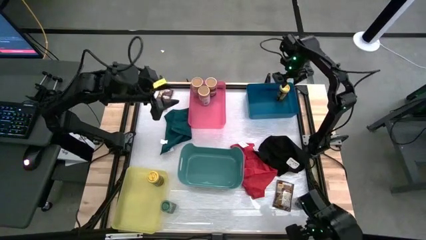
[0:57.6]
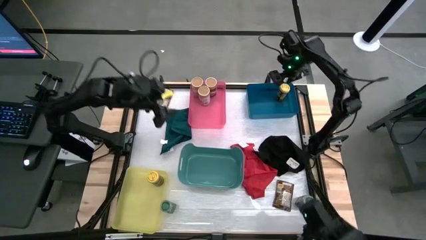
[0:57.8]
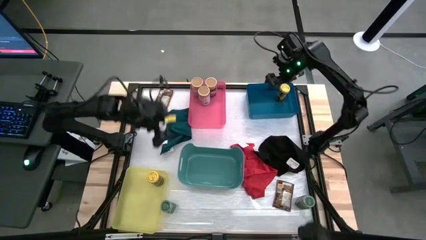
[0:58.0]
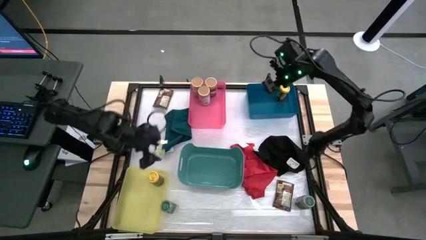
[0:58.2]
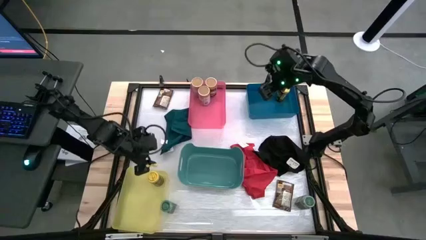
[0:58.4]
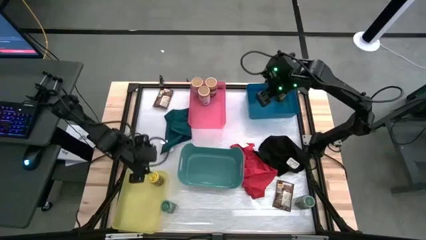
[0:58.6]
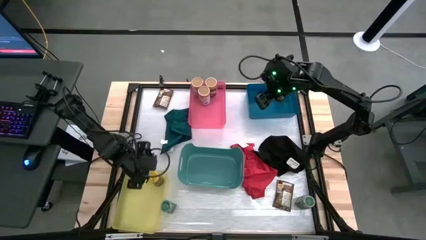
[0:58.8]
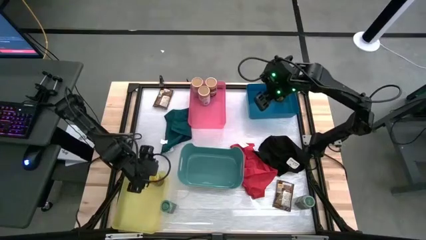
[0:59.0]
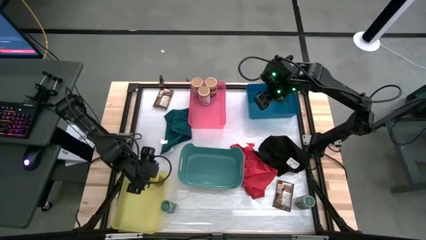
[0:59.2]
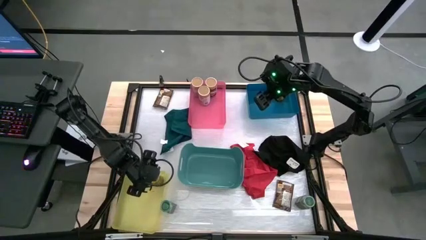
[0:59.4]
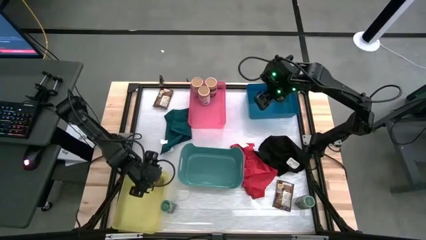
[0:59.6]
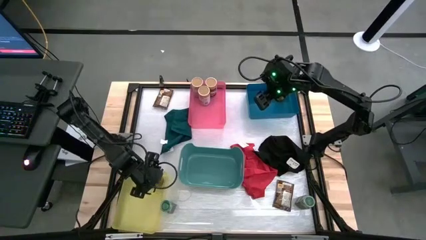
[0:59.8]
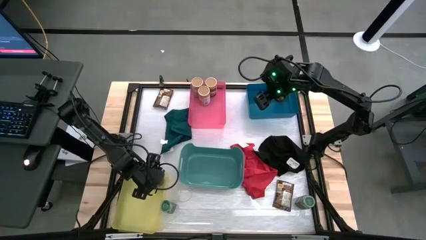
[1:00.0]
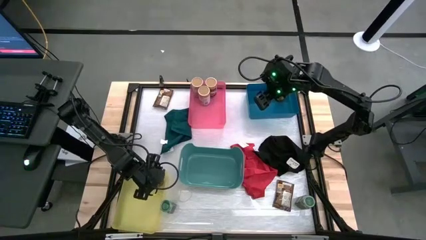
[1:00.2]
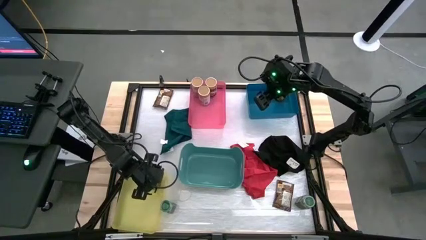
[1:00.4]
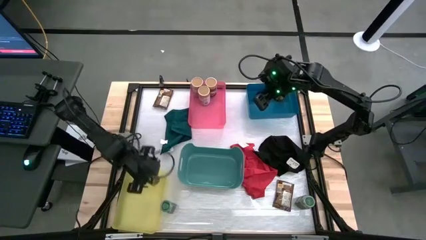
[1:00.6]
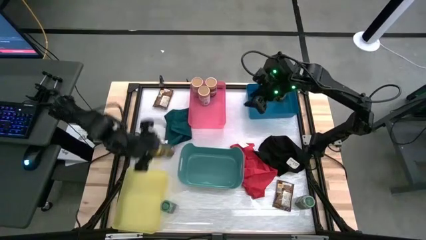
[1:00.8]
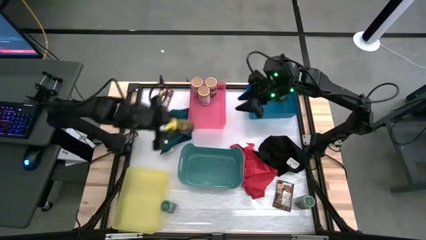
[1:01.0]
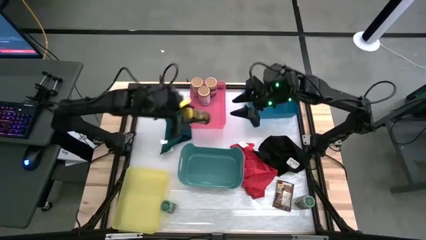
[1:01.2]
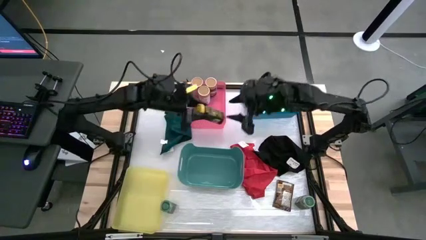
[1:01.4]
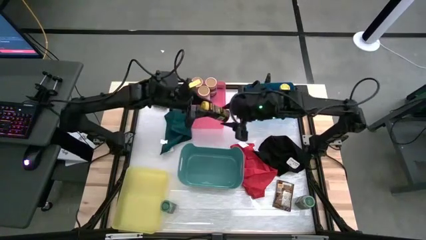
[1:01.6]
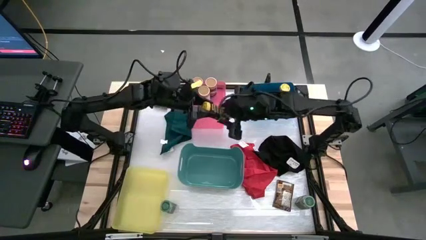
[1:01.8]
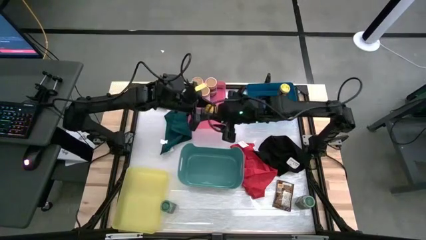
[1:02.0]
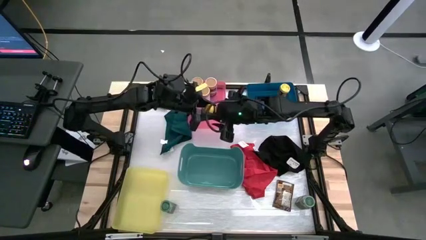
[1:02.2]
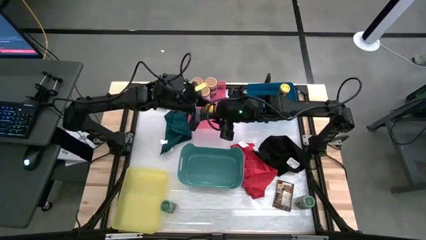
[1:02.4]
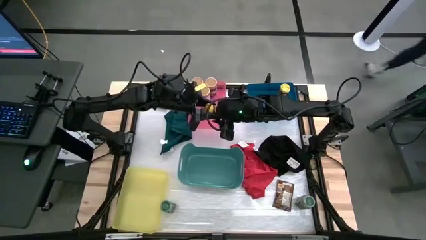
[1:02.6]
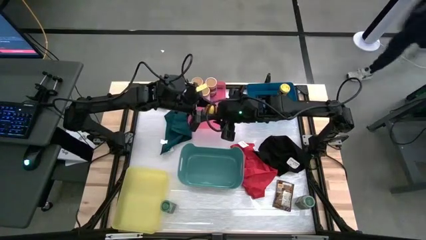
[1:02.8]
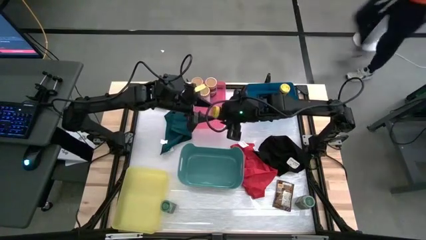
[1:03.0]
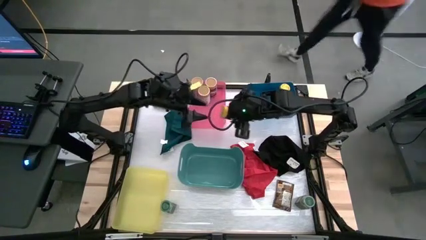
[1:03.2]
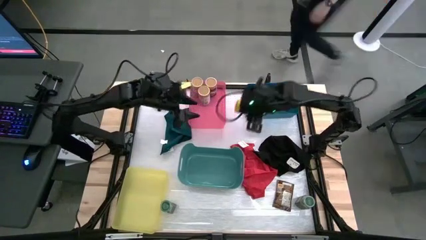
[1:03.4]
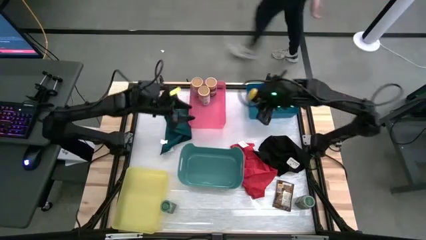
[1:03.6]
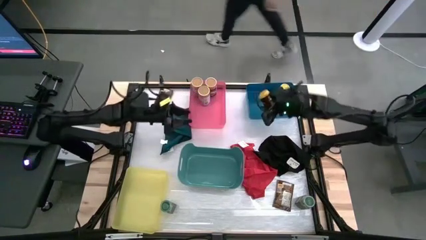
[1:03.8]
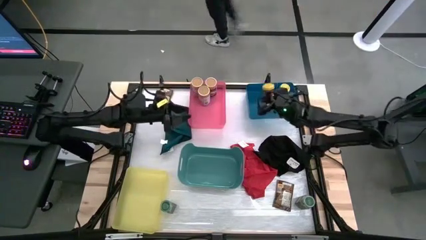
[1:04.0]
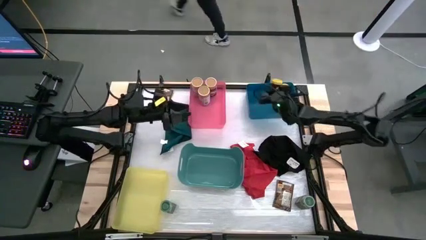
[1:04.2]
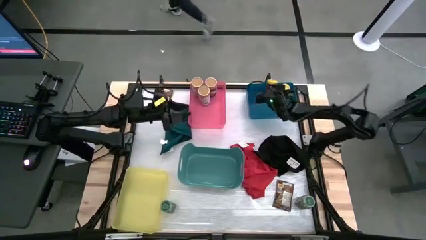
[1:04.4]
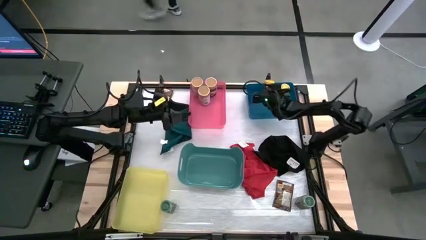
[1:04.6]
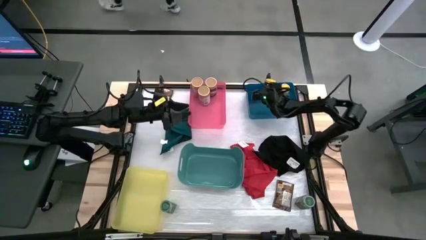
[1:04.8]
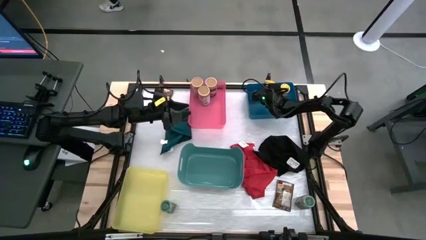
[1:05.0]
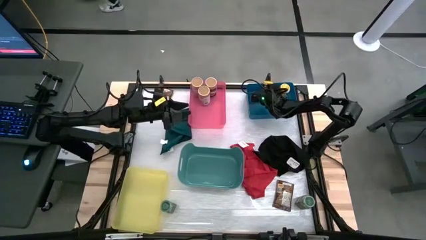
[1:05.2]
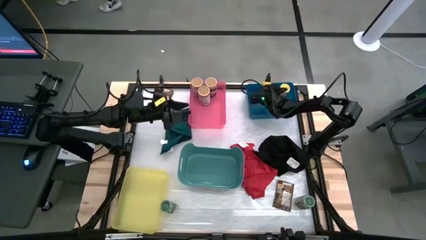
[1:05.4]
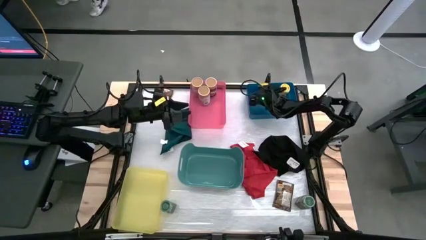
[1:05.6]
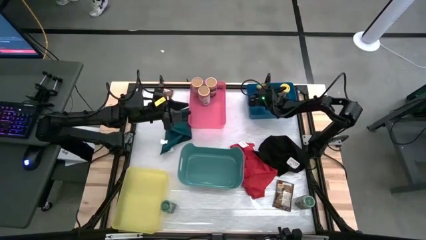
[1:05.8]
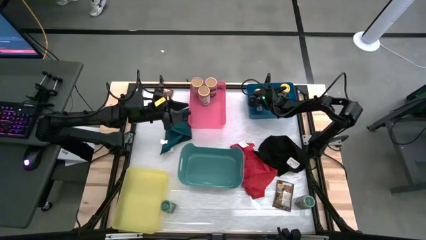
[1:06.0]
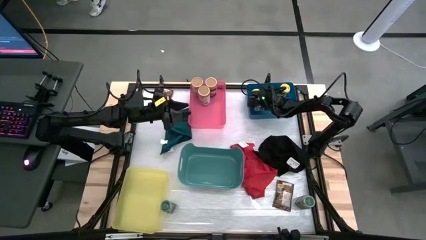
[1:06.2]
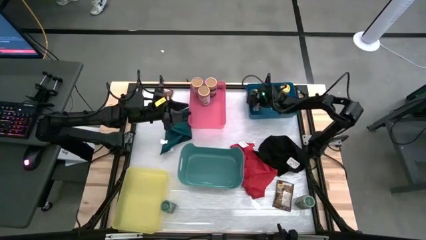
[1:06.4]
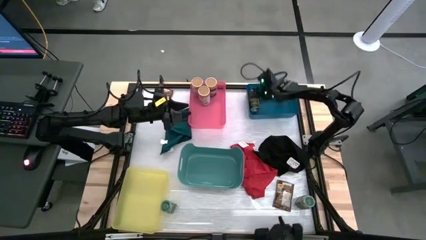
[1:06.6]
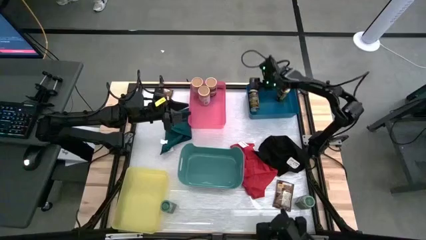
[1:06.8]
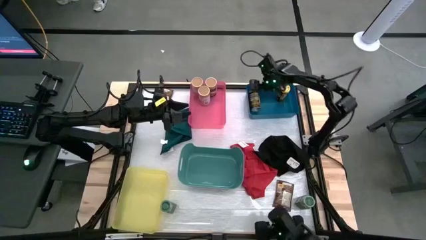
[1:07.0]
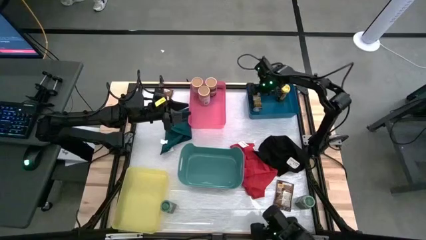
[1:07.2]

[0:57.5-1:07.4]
Task: Sort spices by type
Put the yellow seasoning bottle into the blue bin

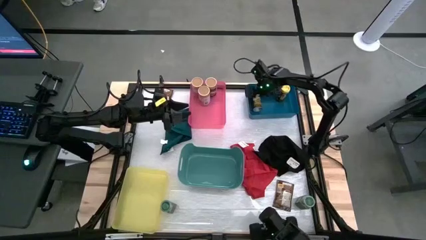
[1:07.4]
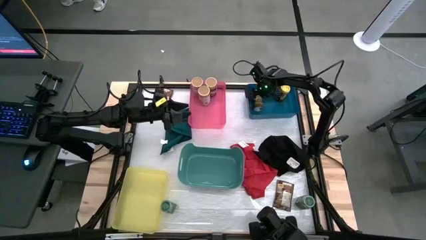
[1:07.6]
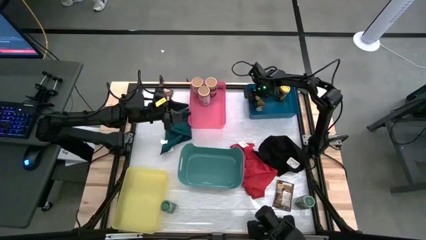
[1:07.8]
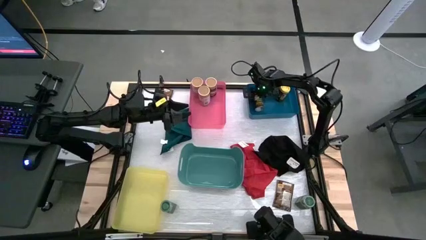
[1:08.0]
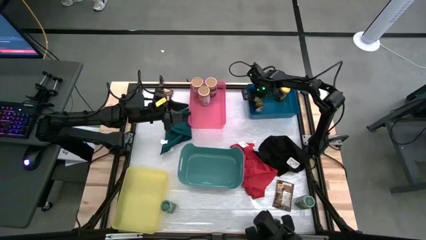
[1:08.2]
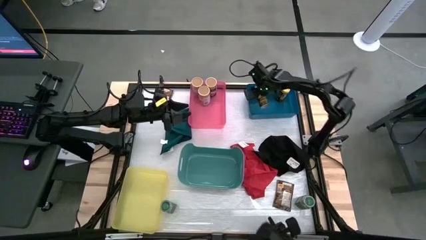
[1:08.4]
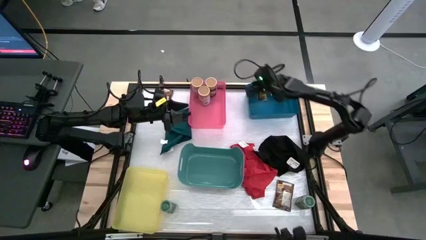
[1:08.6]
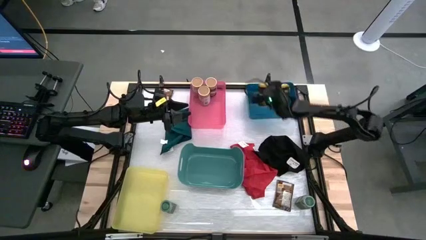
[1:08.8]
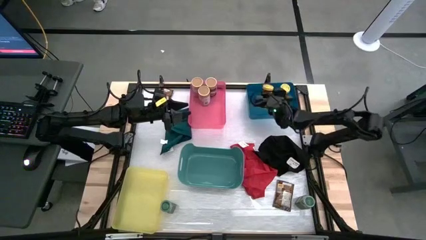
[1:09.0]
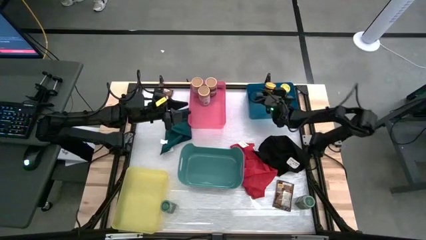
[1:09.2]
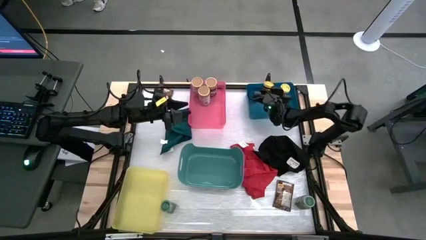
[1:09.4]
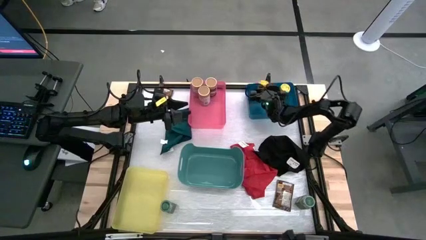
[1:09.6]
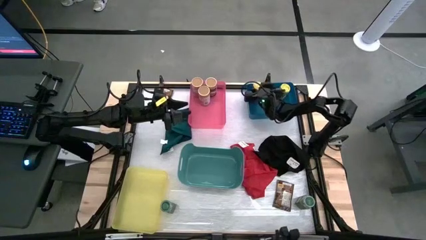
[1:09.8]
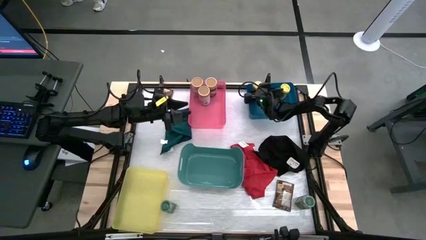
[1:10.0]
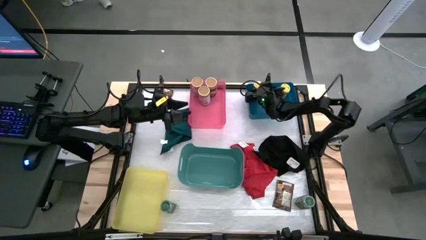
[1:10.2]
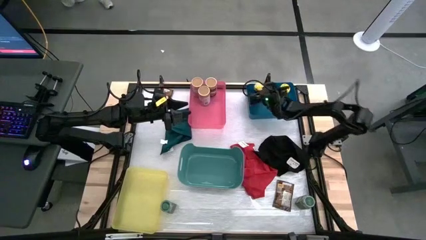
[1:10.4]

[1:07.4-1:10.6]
Put the yellow seasoning bottle into the blue bin

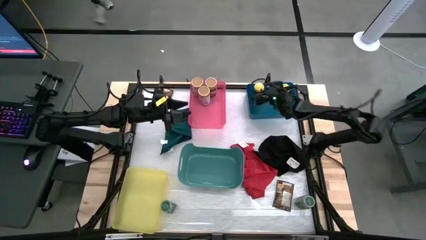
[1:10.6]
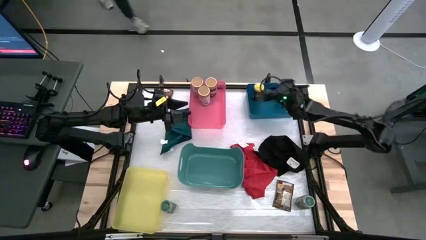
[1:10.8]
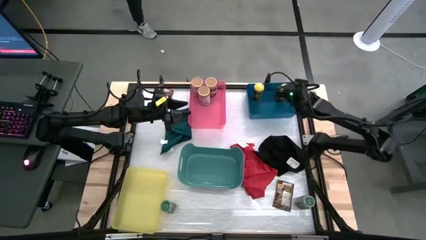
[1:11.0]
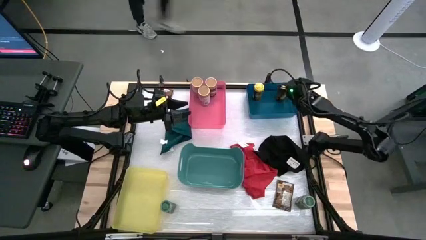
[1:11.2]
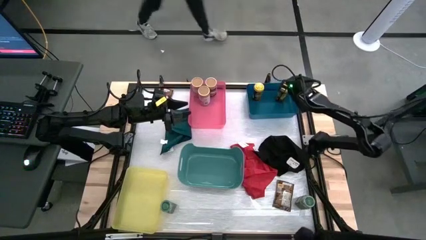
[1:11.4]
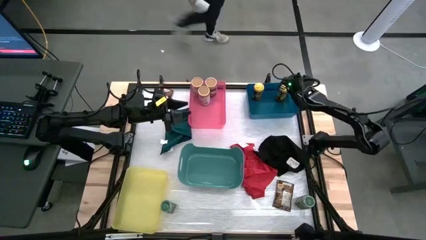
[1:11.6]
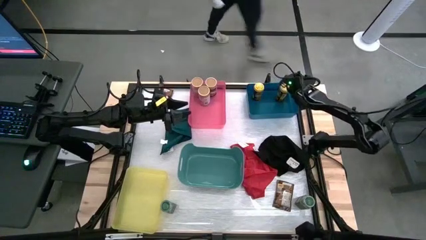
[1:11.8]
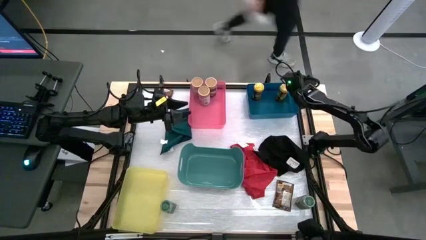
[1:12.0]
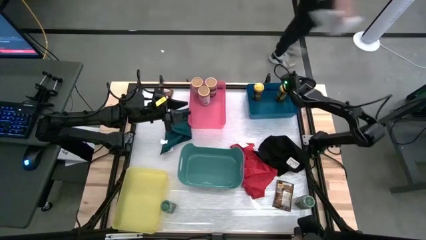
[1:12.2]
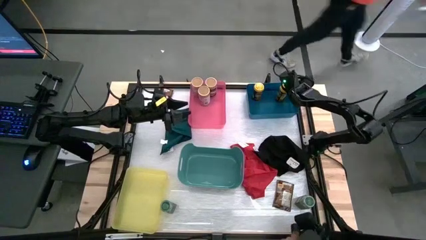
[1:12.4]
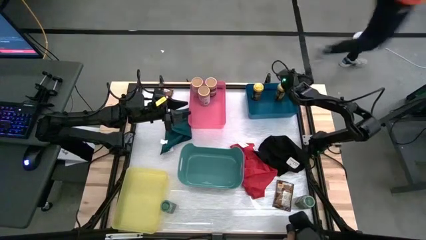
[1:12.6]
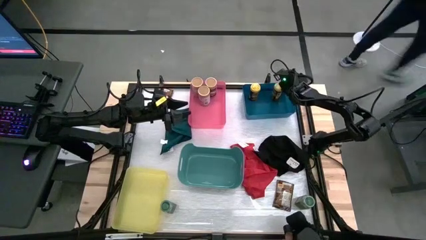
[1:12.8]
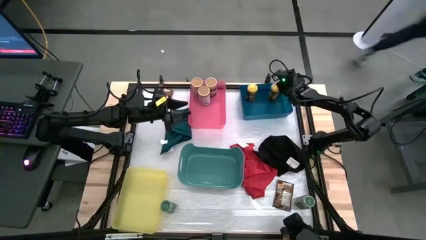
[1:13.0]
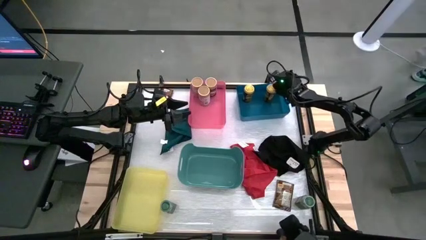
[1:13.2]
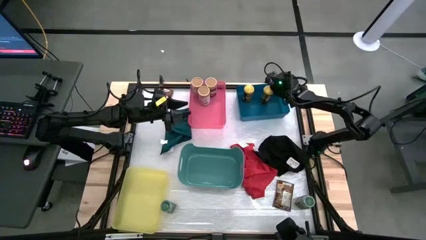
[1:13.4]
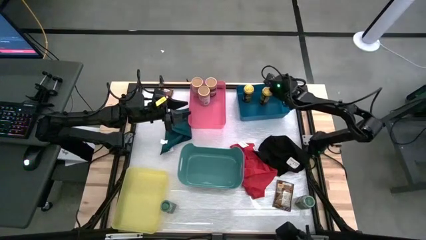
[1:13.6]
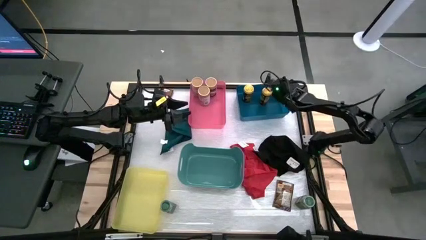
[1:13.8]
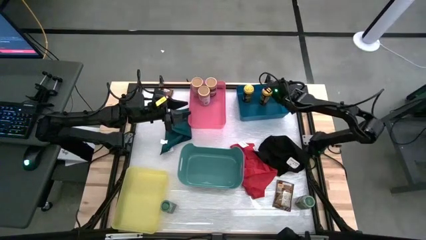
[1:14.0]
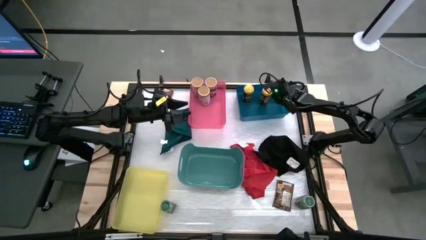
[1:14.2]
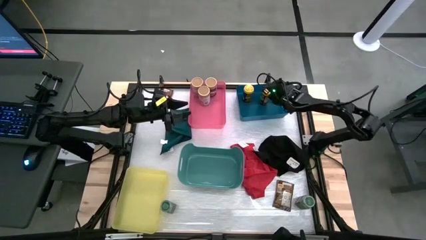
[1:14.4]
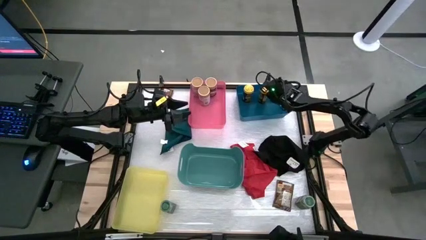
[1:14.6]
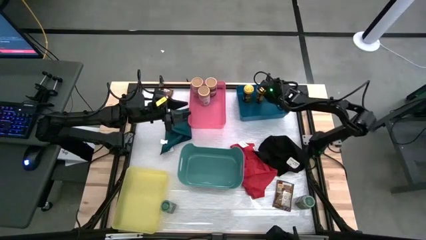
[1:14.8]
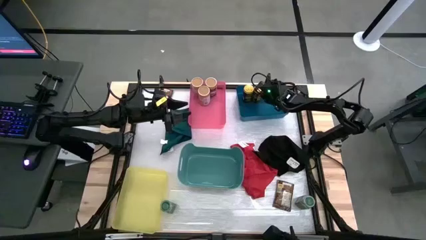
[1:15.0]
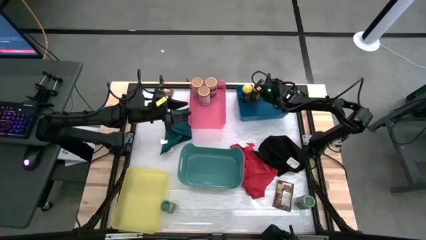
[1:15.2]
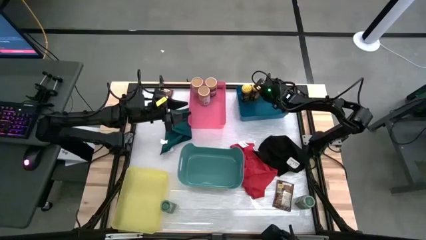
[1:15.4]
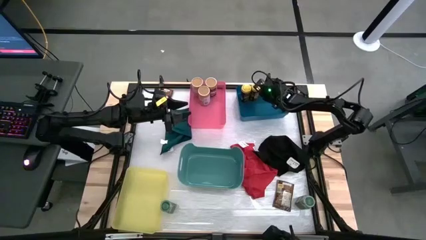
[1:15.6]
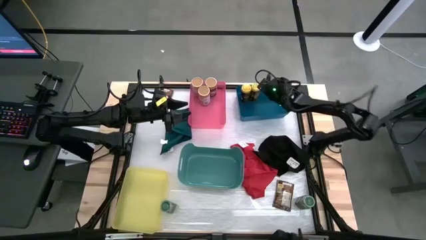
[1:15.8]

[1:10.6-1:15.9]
Adjust the yellow seasoning bottle in the blue bin
